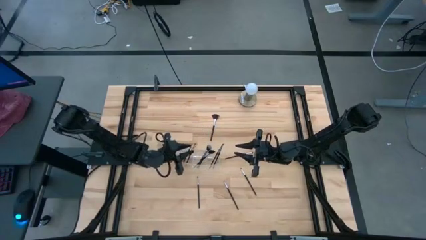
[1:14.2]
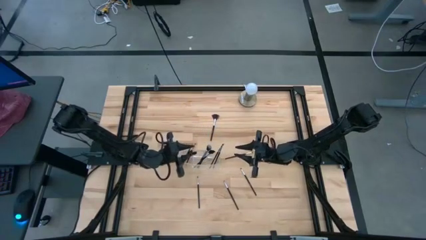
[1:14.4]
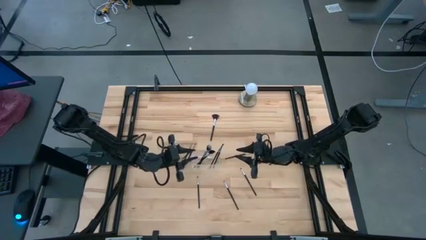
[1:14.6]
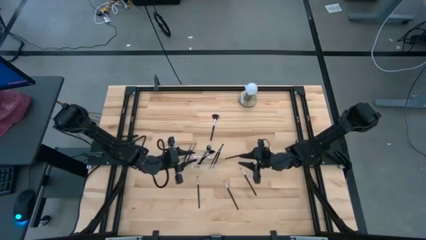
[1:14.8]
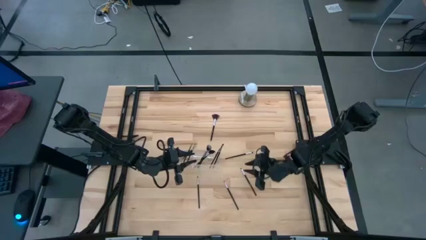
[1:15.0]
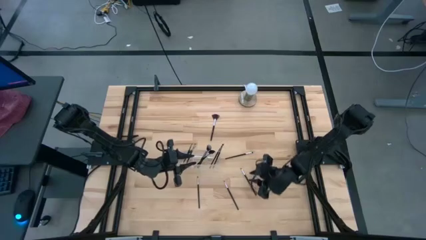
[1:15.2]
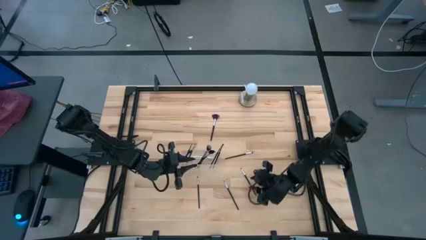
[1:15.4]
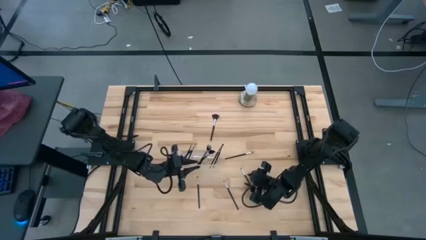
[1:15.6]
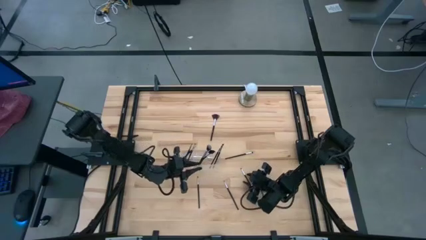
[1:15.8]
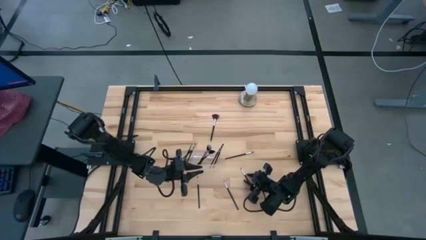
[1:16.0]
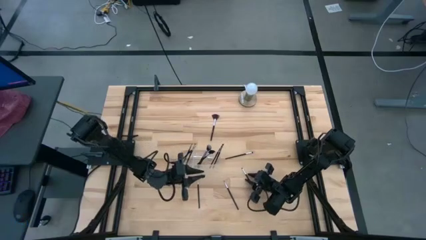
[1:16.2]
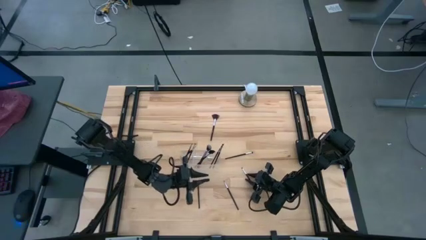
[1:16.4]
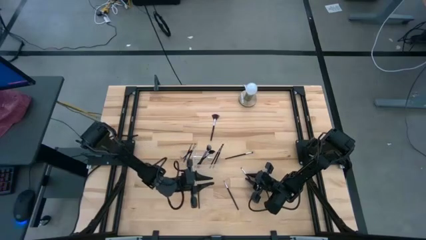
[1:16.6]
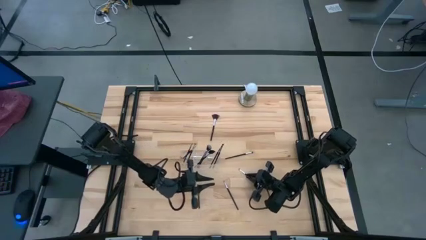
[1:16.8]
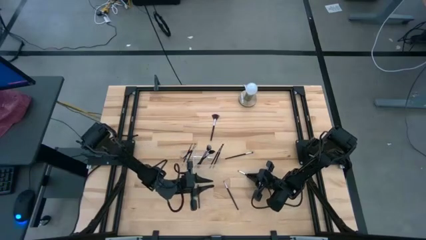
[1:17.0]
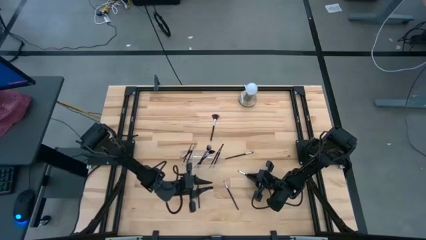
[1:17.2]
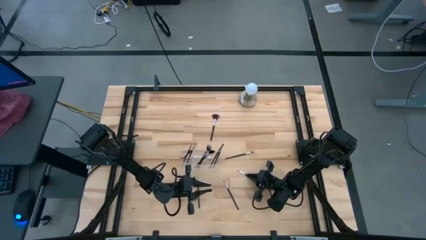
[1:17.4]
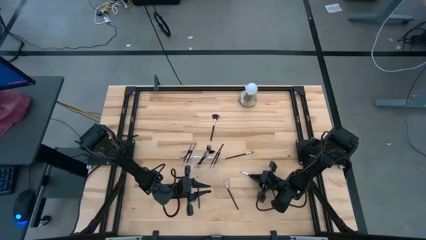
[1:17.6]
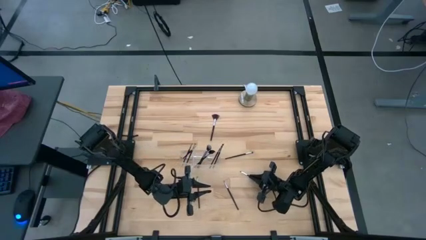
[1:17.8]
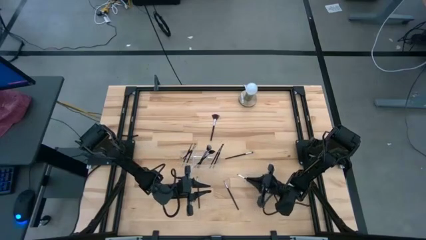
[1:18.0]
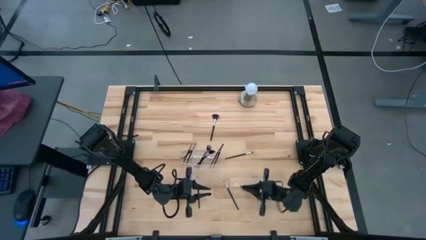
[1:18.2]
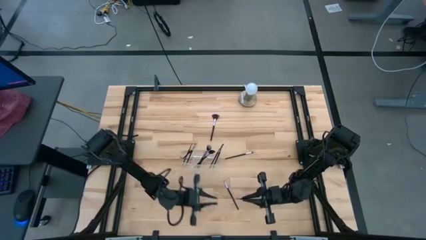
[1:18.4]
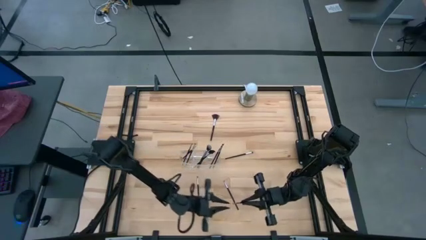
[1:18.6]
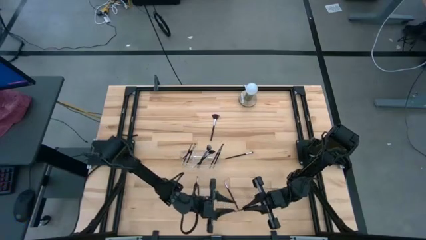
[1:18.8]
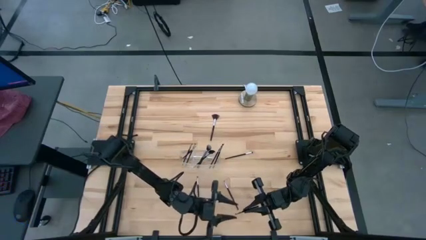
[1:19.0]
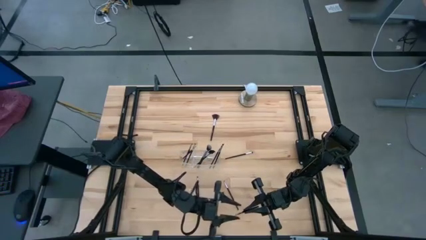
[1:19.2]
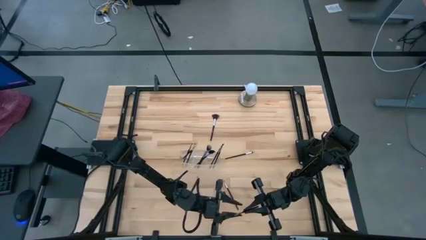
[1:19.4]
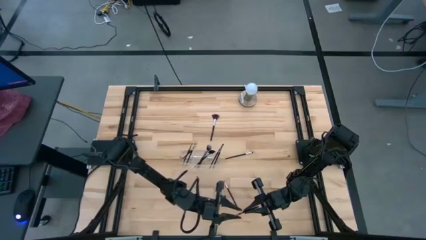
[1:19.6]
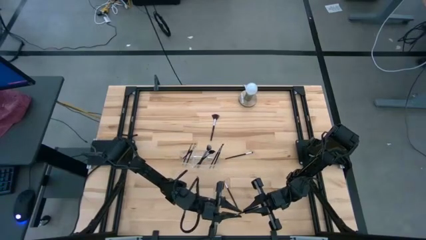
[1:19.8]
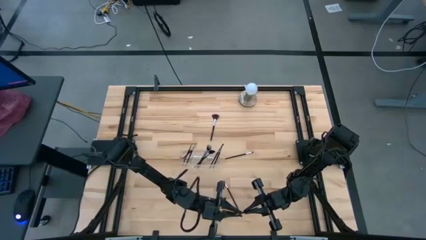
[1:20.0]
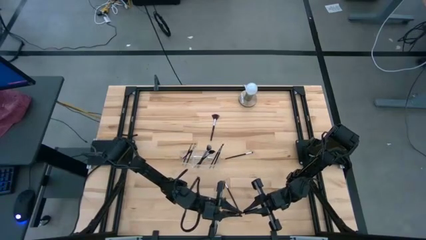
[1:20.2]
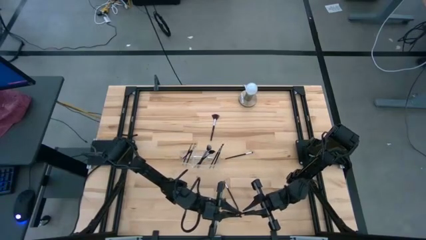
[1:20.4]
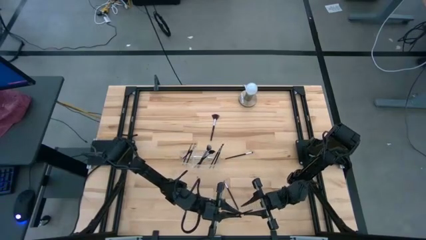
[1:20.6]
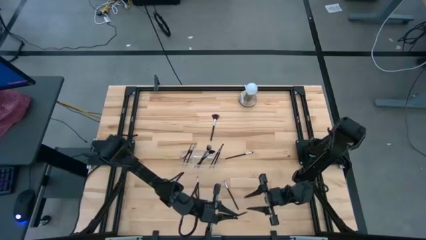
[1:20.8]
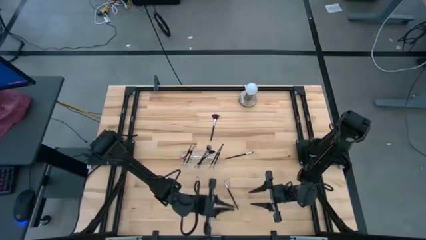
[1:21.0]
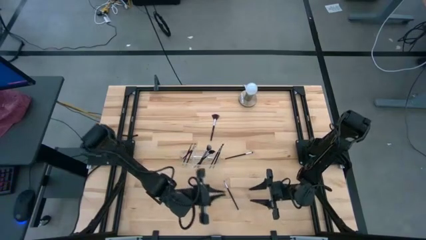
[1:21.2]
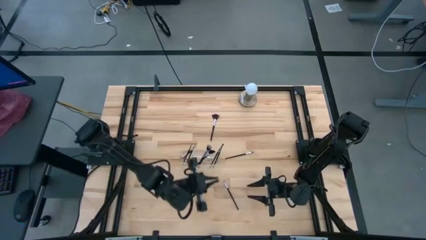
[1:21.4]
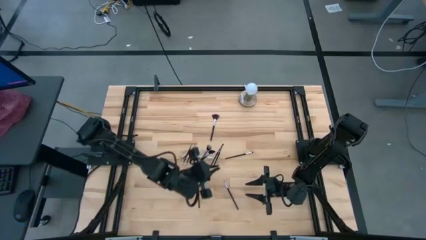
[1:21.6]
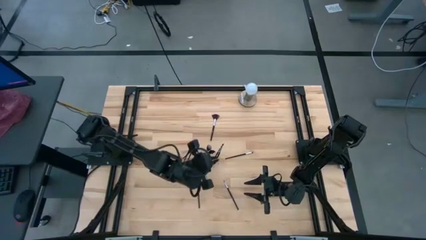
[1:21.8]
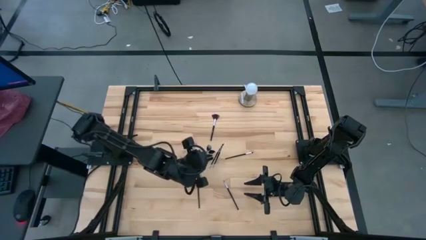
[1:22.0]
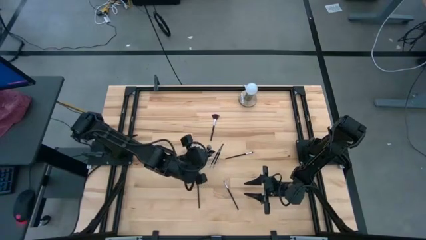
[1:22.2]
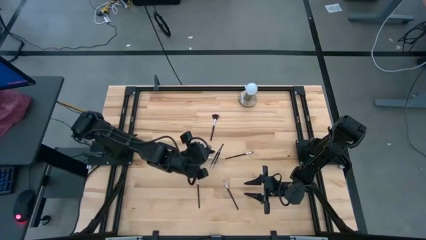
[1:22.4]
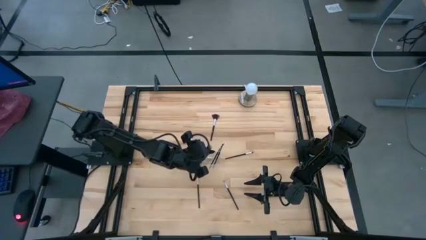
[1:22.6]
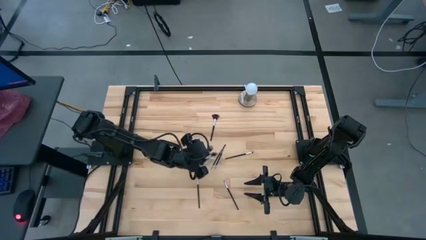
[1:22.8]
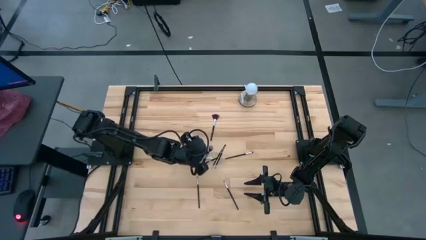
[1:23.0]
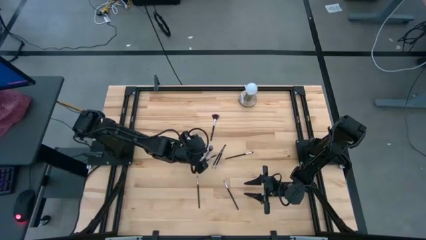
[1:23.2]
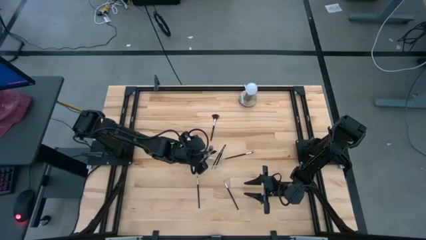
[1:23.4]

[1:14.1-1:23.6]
Task: Put items in baskets/containers
Put the eyeshadow brush into the transparent organizer

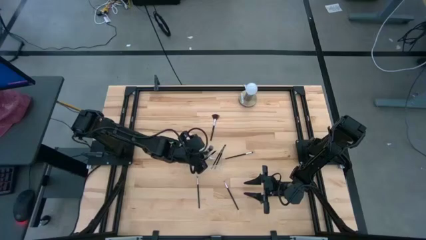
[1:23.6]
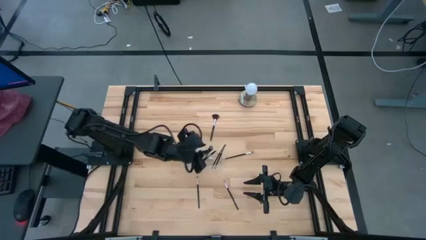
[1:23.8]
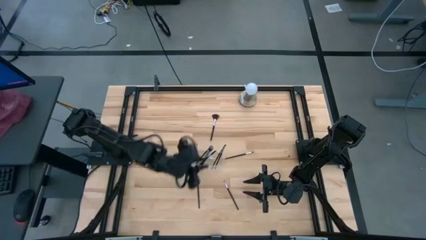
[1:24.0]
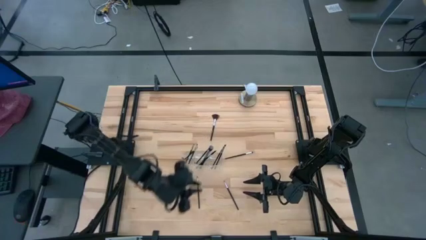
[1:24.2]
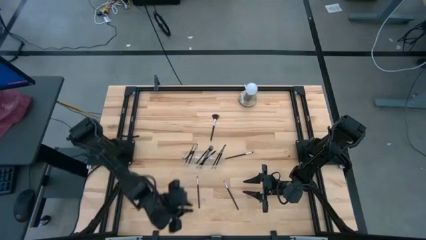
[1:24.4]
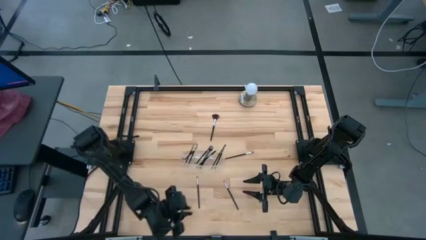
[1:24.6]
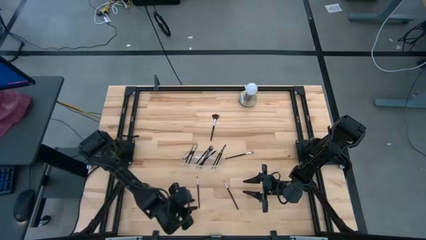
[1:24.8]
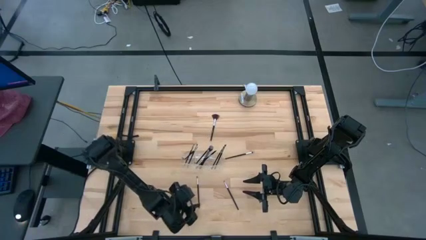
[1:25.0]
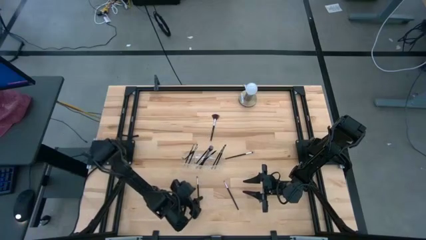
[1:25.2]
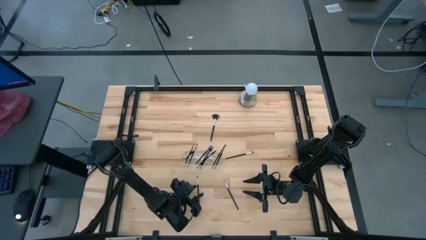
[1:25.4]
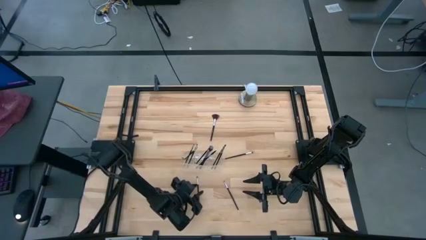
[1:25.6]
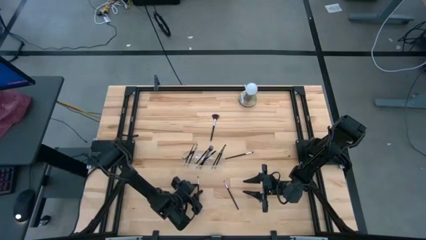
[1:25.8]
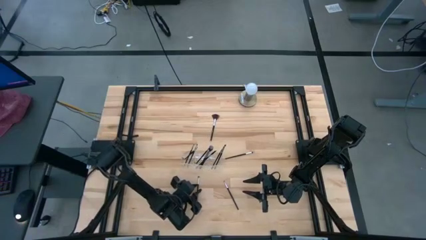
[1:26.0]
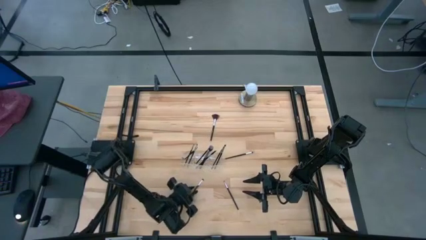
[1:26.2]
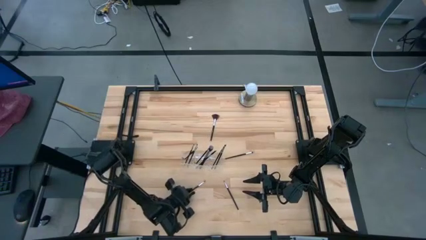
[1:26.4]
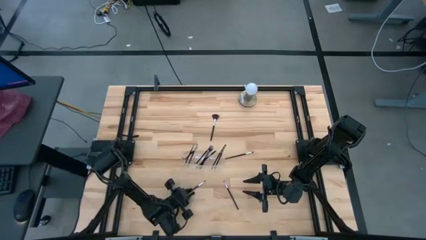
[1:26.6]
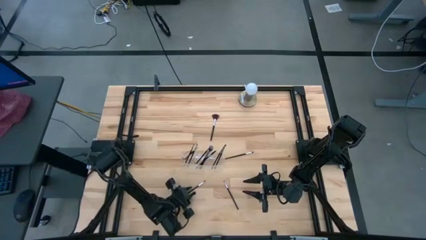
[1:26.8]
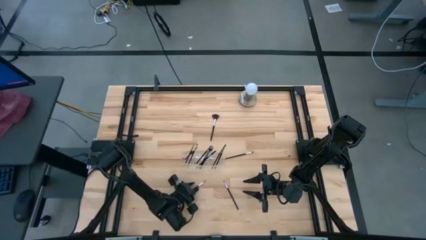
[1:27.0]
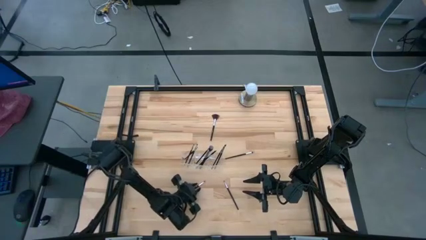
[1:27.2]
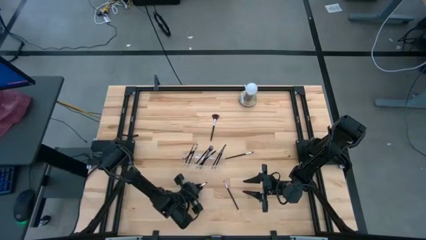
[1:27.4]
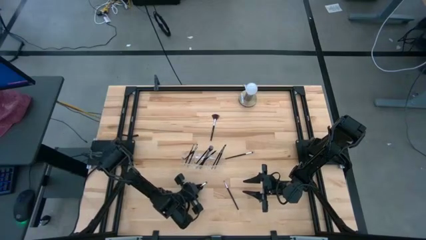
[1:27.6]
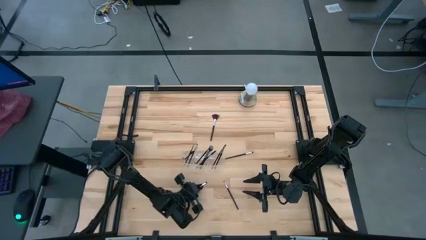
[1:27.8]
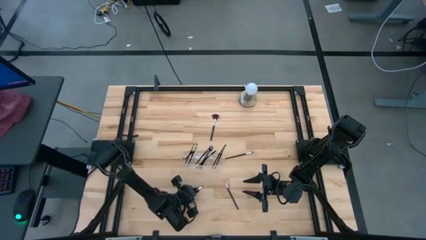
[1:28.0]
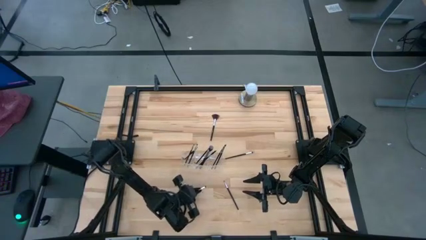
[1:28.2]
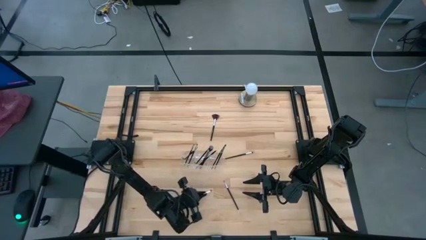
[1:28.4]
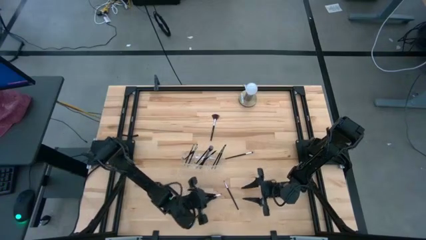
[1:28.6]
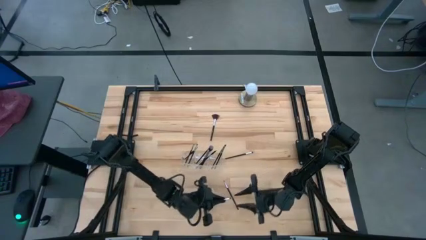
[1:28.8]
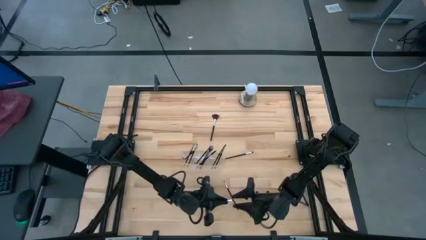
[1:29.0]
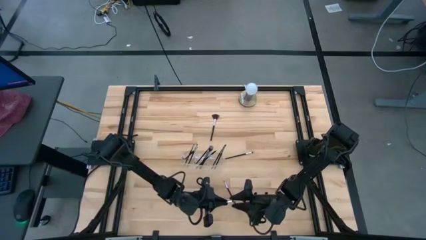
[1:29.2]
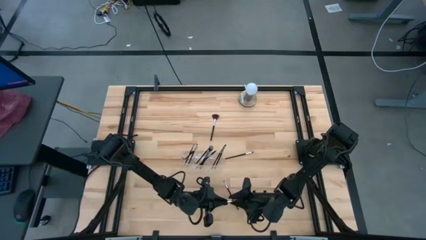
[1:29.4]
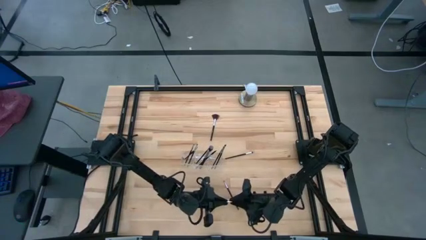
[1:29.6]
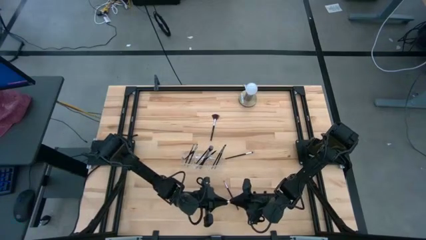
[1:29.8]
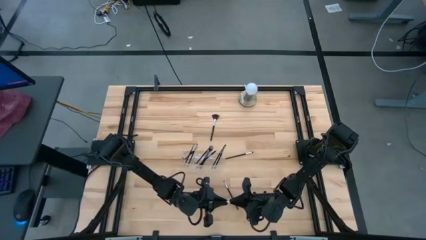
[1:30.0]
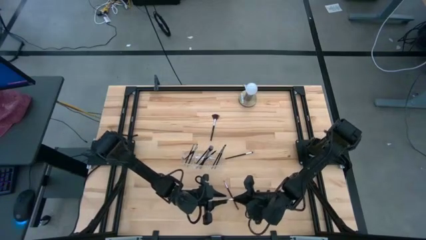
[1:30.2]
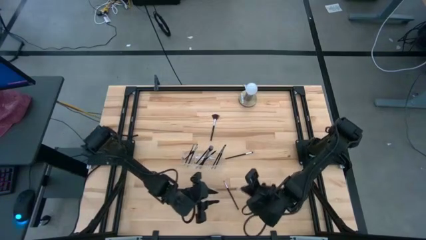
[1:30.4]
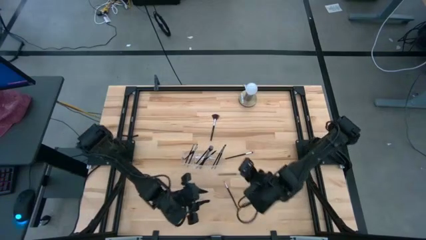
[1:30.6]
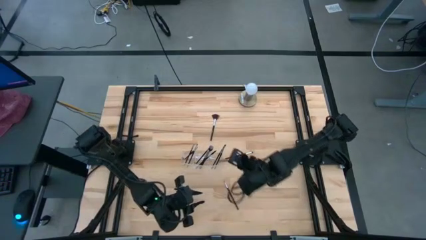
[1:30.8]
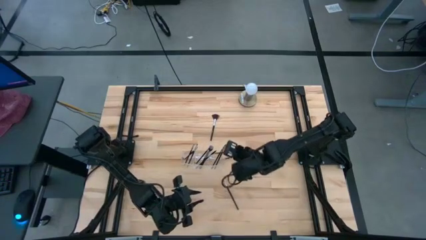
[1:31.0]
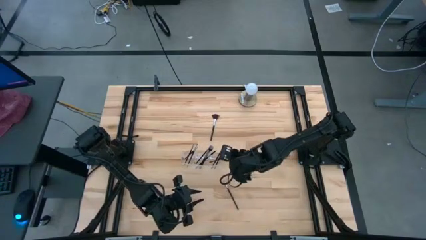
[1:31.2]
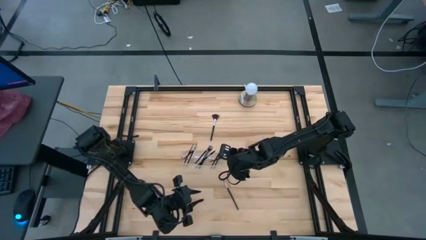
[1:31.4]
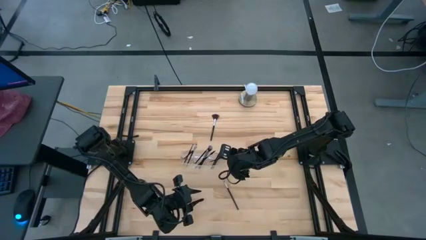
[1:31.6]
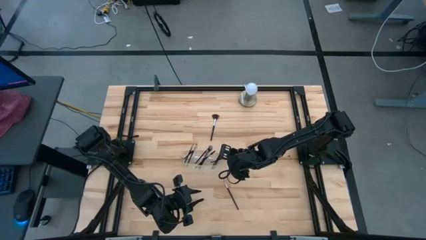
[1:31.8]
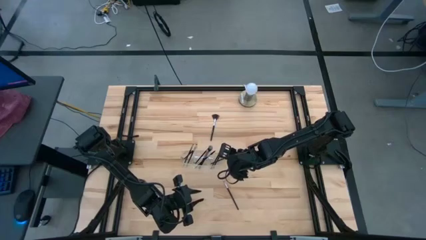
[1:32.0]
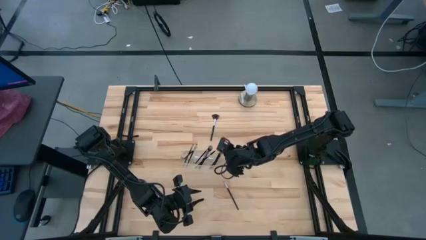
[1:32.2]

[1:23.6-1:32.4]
Put the eyeshadow brush into the transparent organizer
